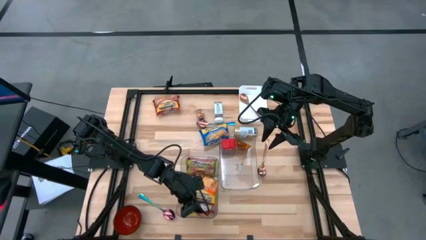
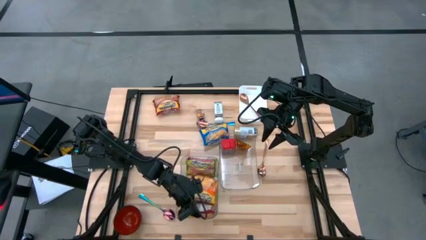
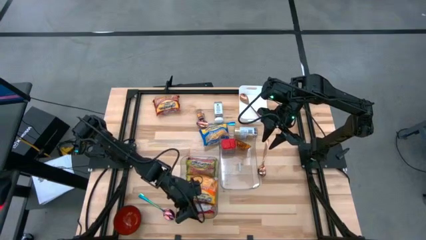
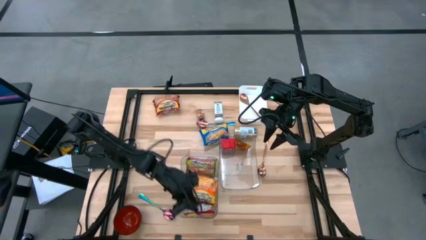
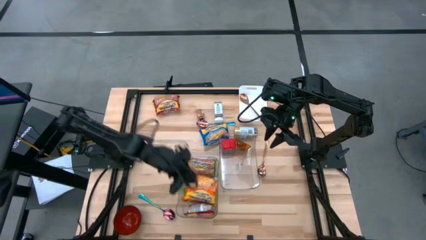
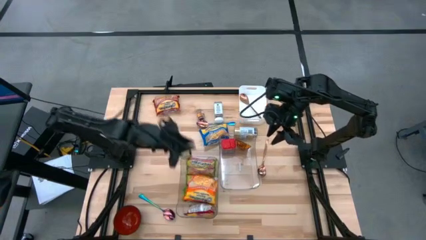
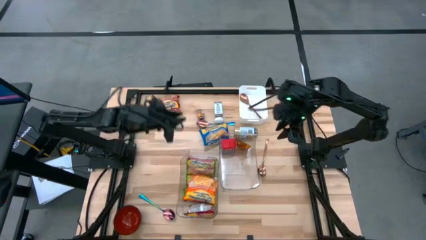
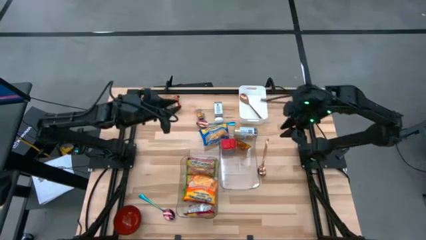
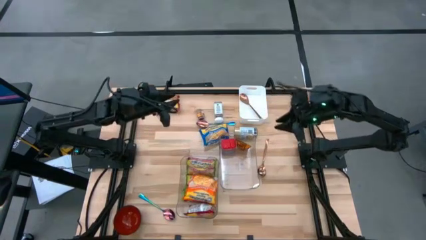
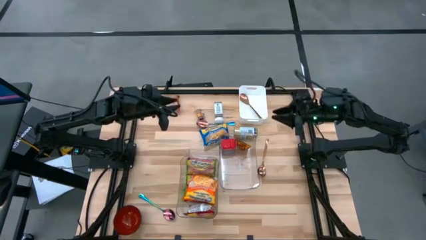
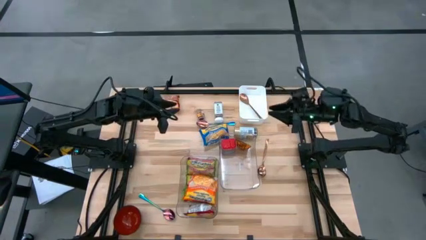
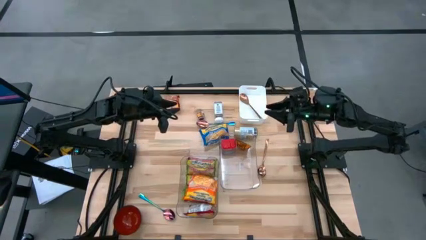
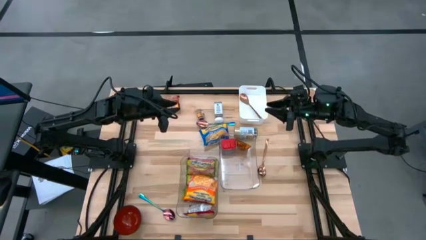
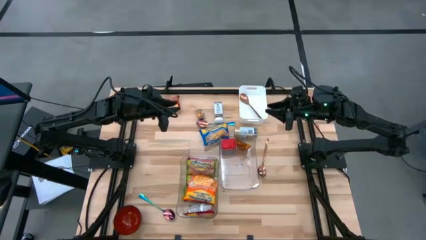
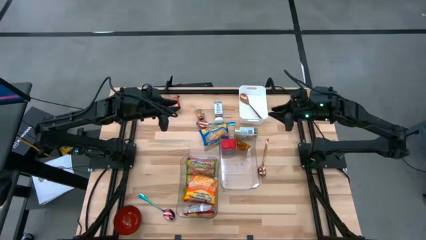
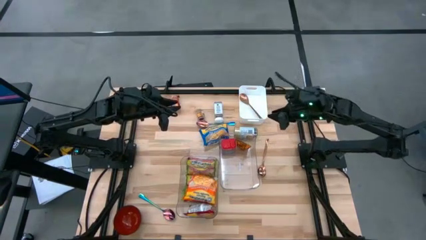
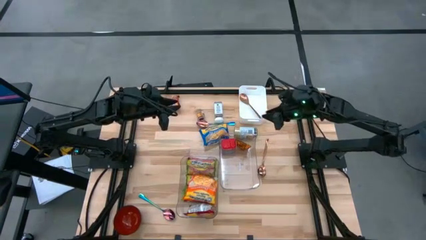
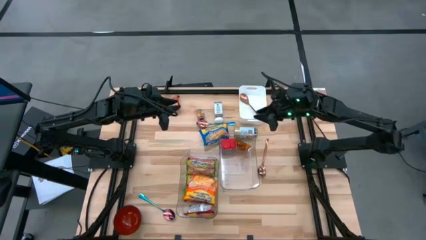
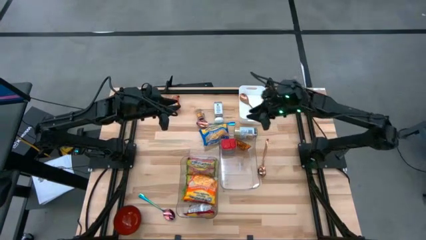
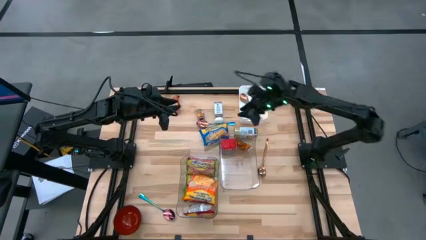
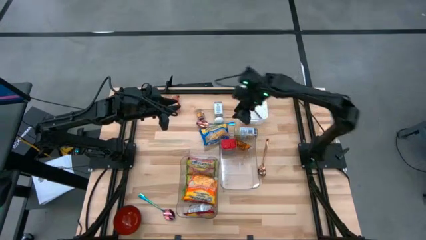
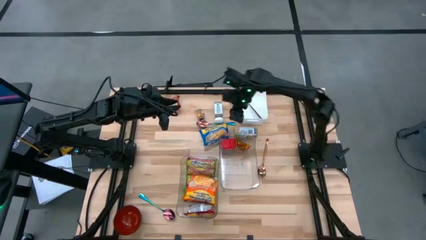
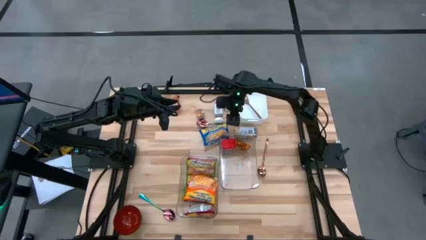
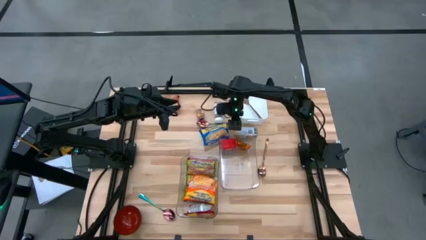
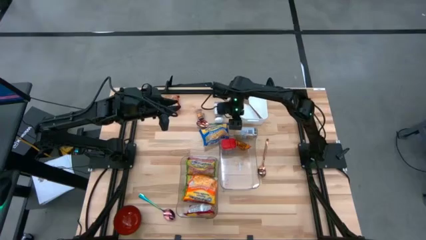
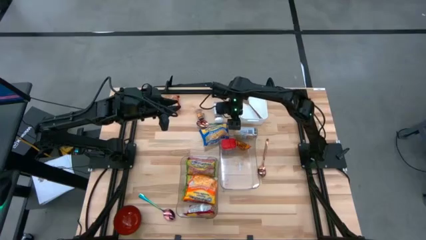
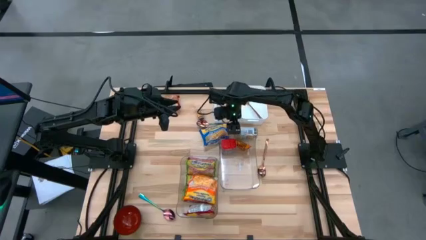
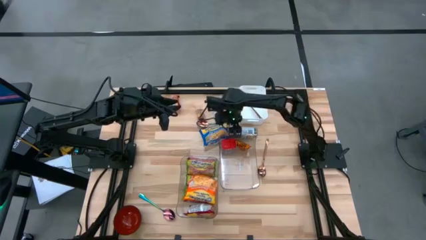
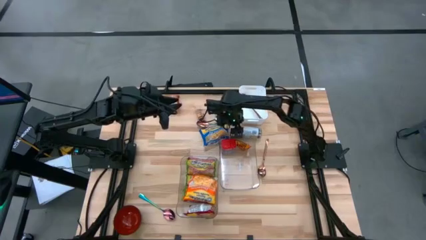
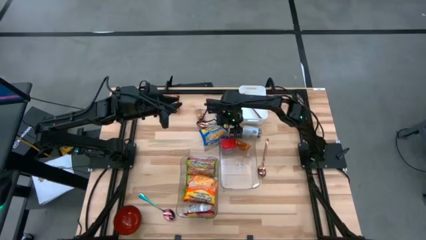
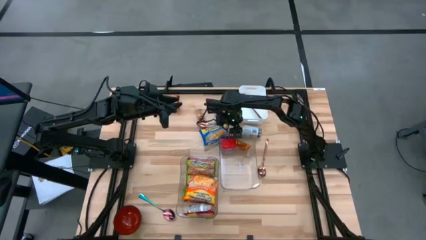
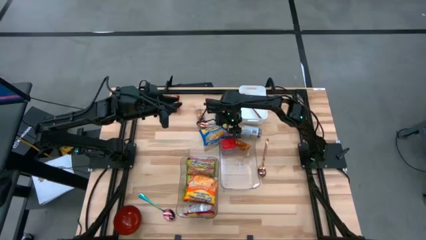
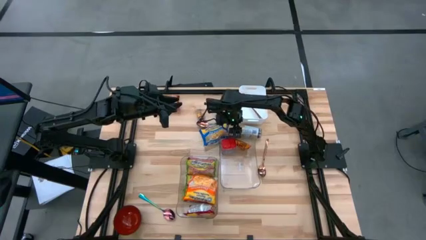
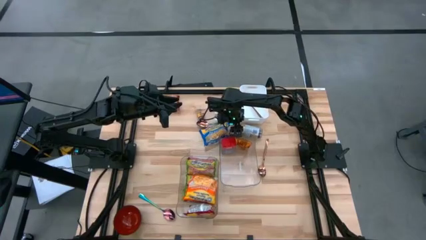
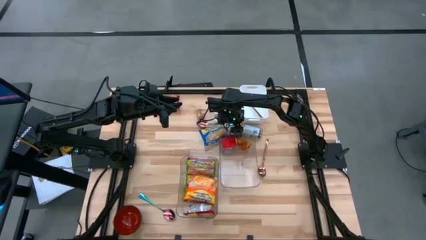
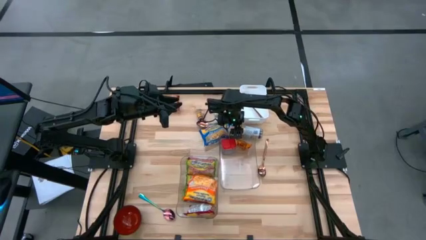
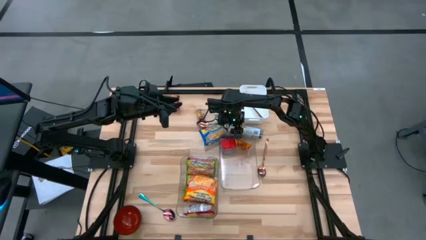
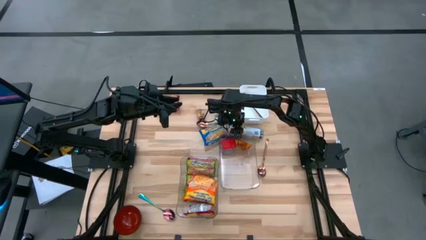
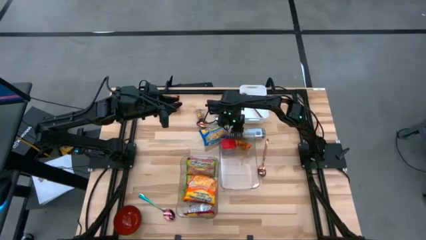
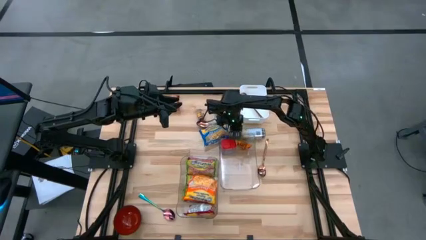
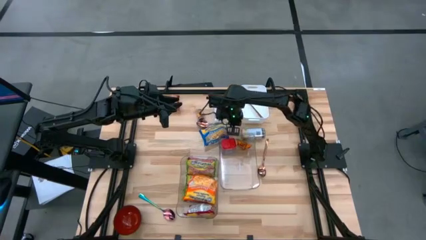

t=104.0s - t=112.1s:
Task: Pick & Place Food Item
Put the gold seasoning bottle into the right transparent bin

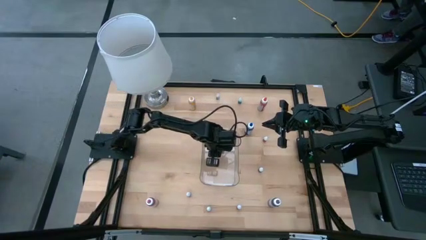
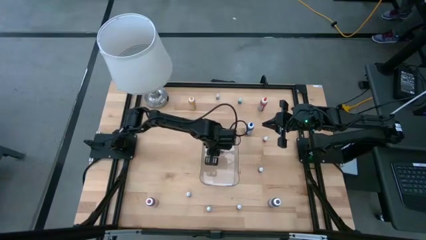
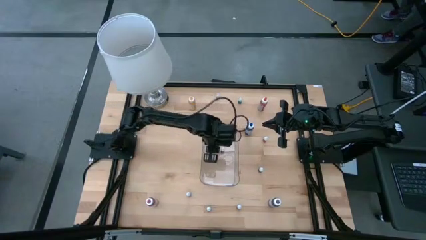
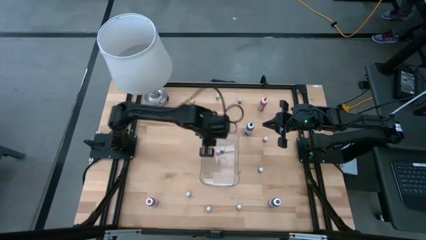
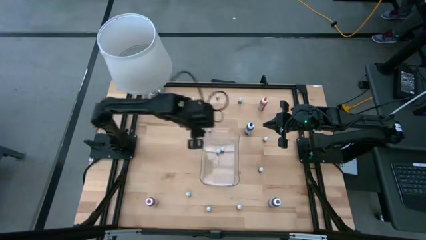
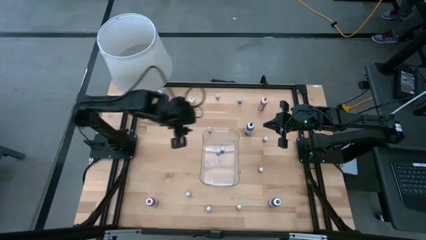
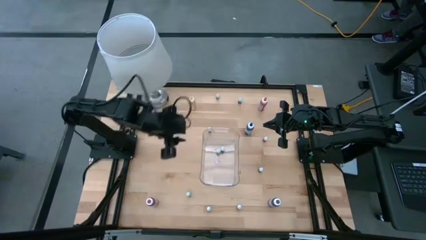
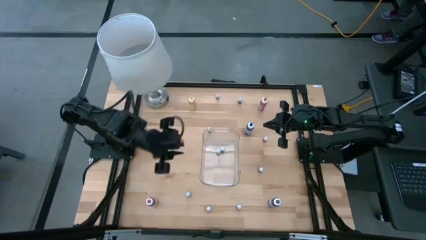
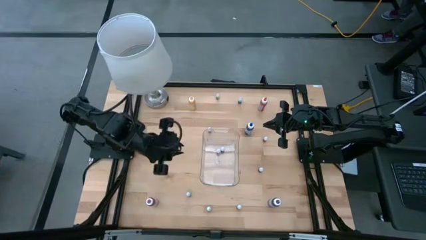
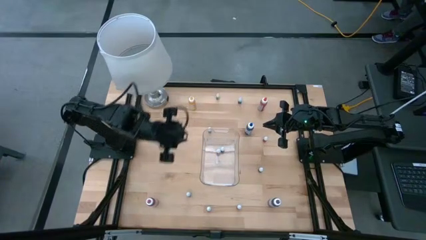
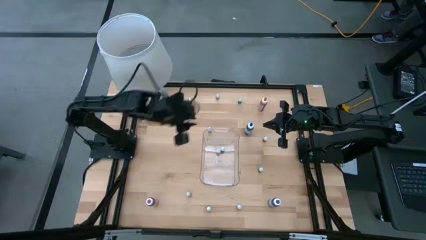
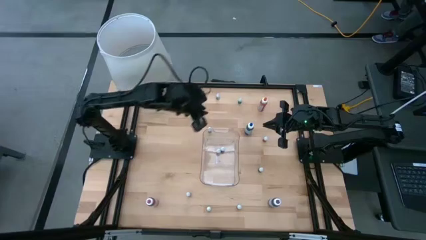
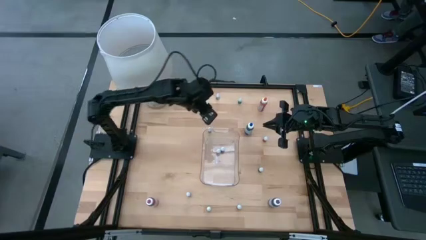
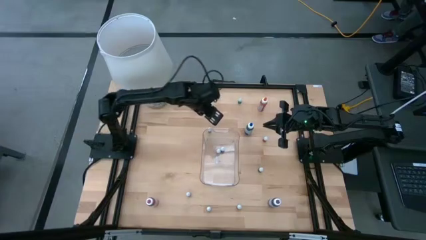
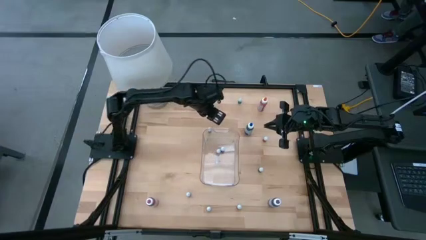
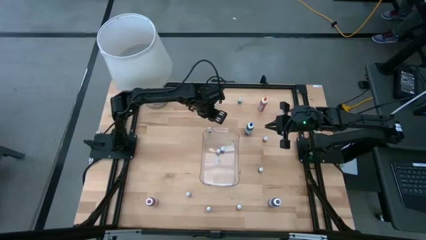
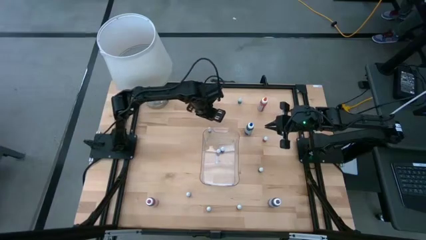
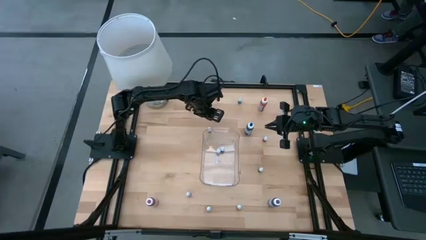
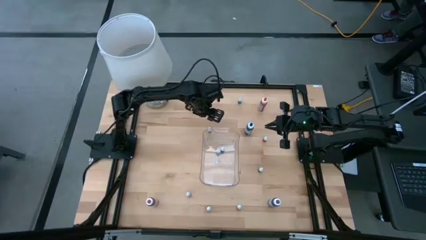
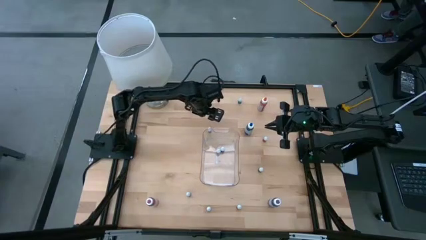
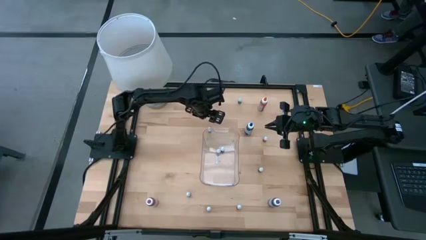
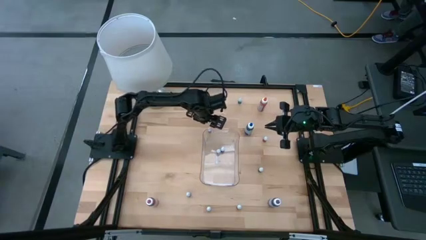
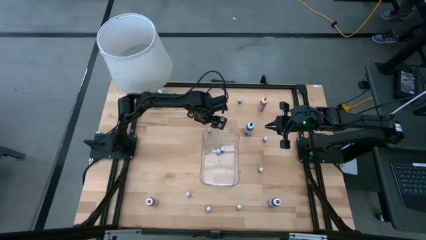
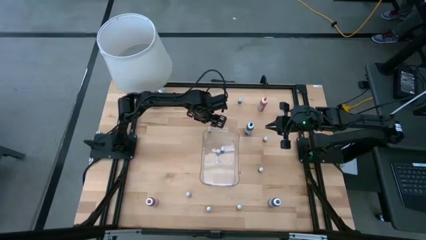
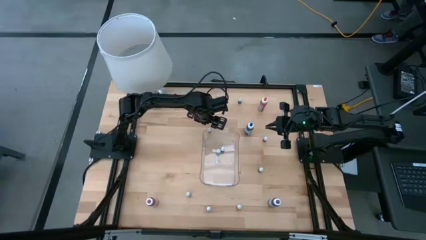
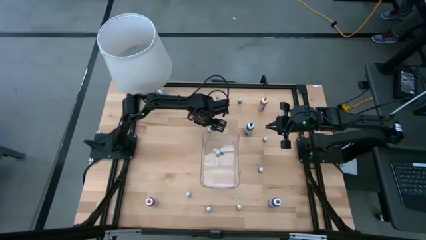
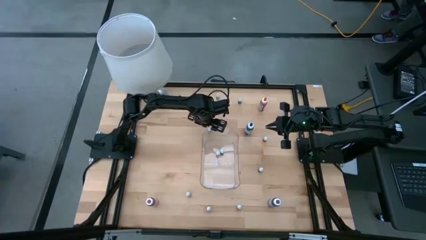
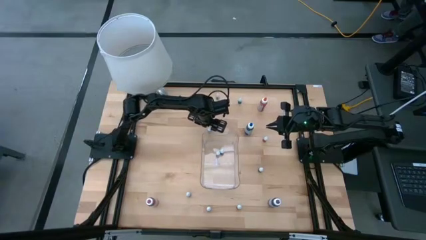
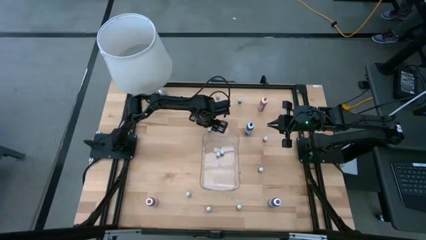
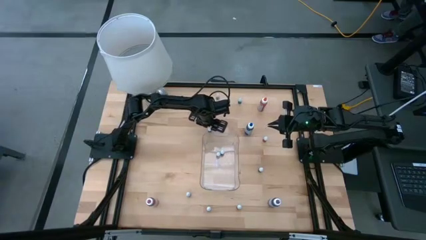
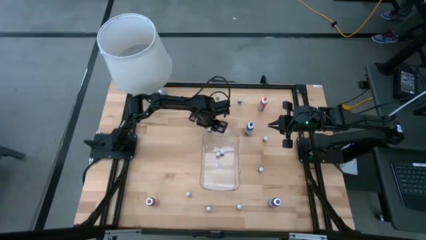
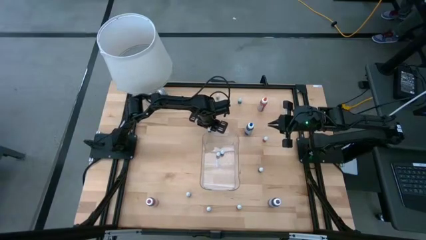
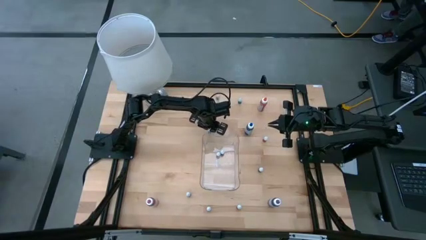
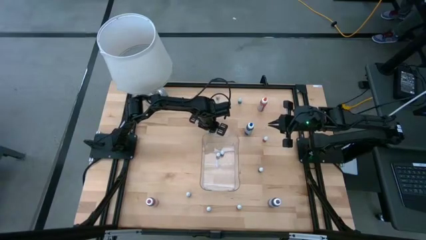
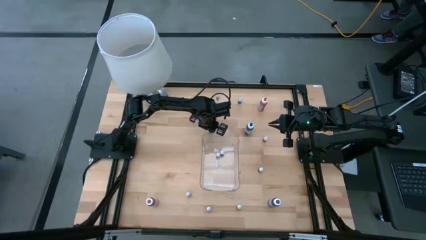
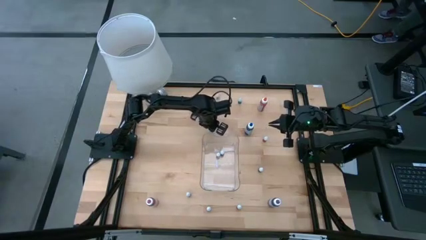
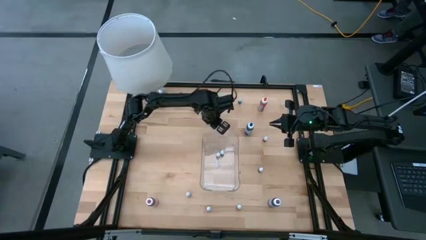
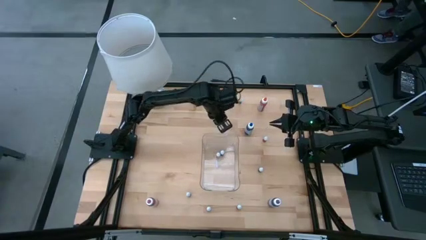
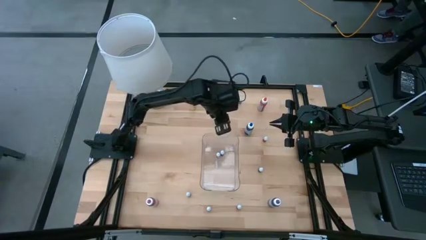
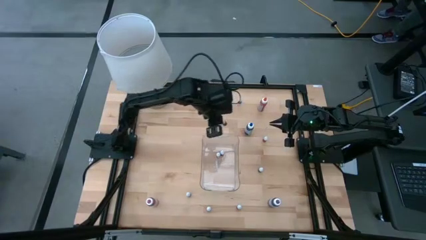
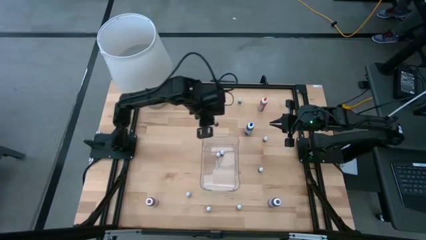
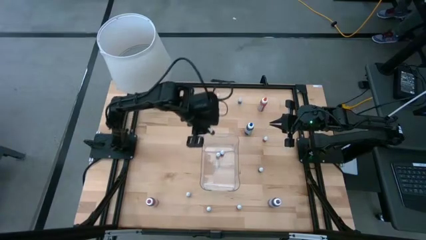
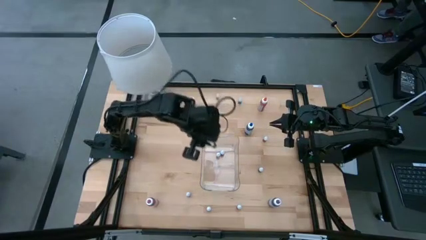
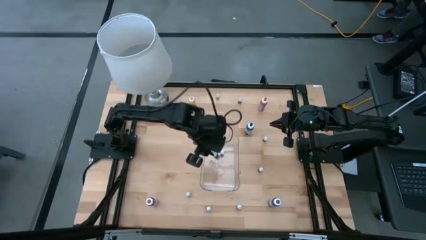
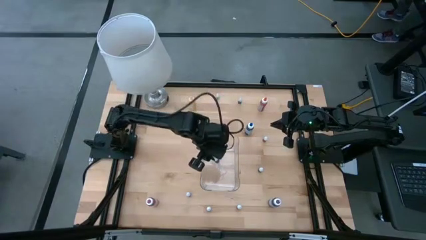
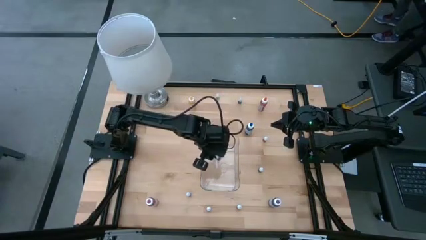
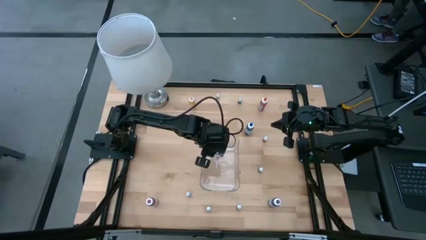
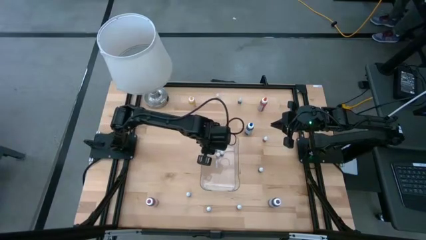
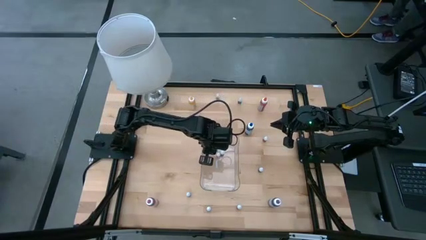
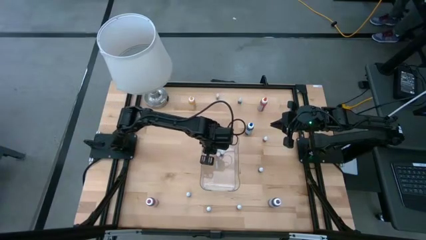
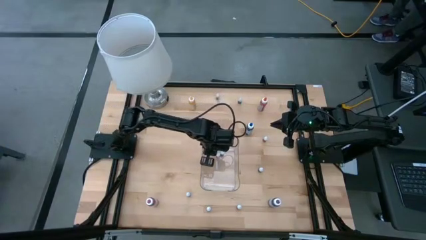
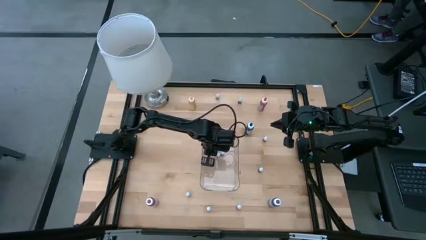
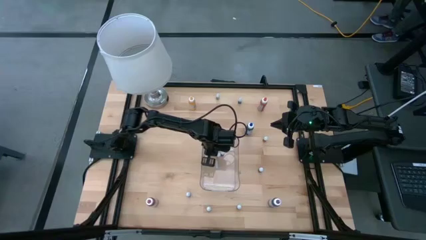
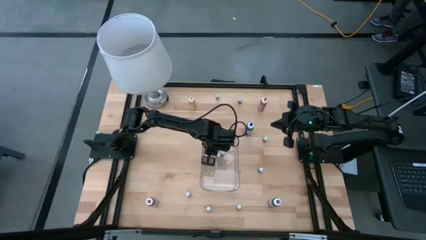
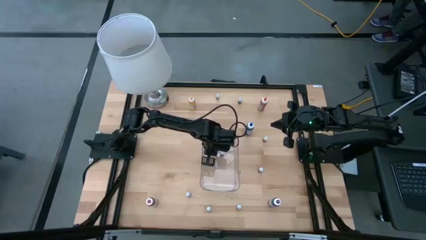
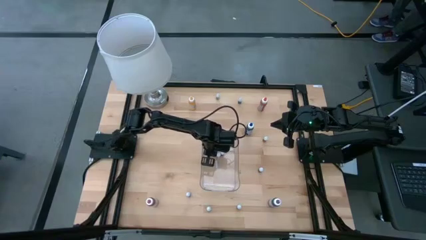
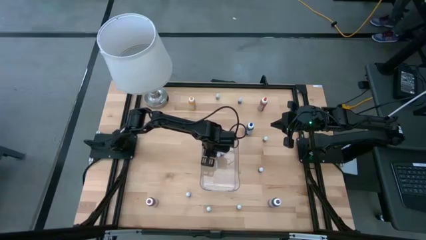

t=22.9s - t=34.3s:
Task: Pick & Place food coloring
Put the top small brown food coloring bottle into the transparent container
